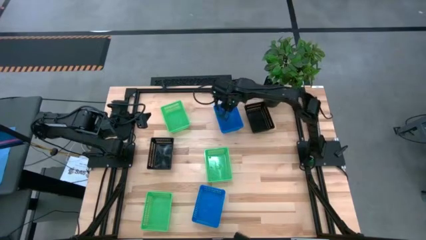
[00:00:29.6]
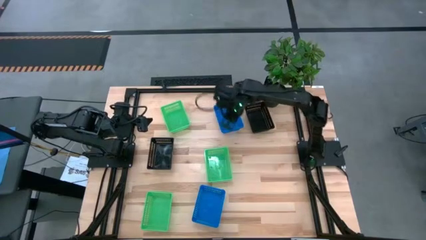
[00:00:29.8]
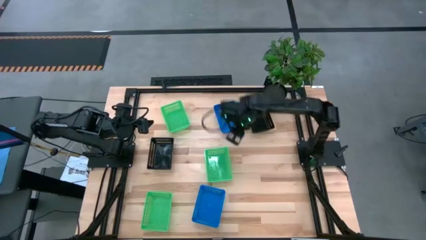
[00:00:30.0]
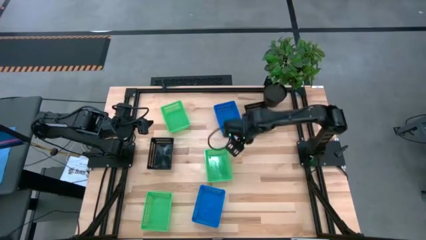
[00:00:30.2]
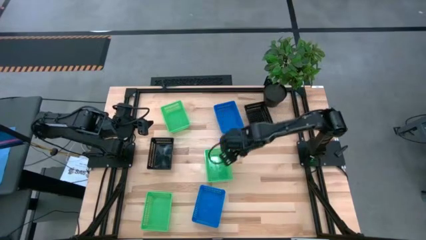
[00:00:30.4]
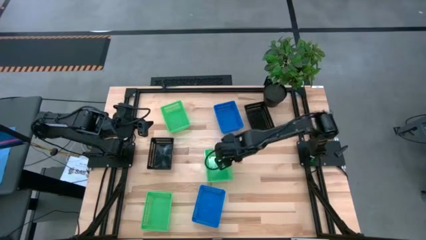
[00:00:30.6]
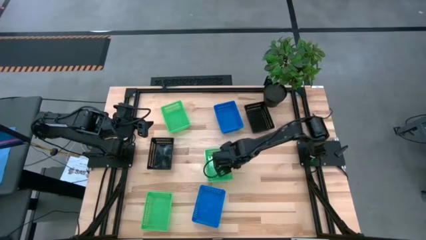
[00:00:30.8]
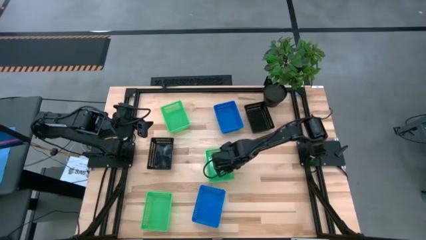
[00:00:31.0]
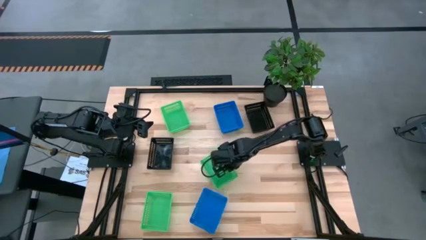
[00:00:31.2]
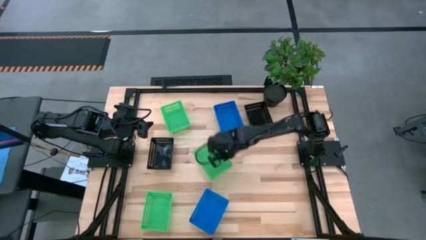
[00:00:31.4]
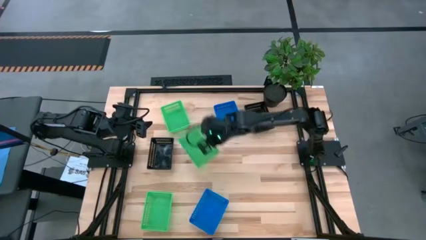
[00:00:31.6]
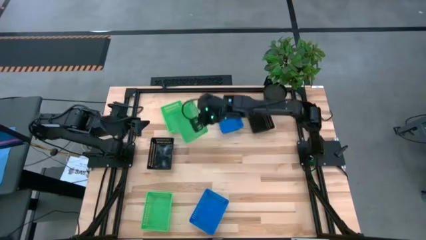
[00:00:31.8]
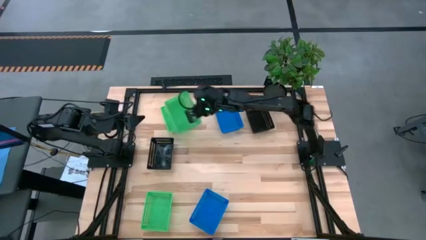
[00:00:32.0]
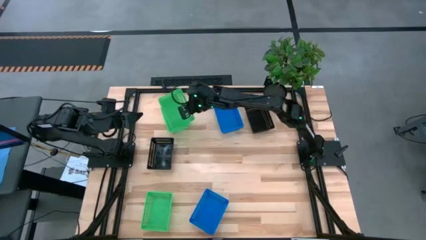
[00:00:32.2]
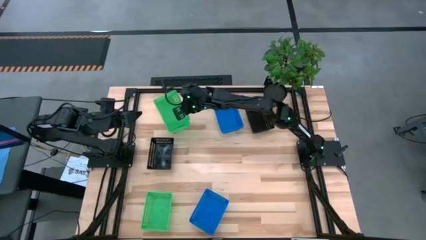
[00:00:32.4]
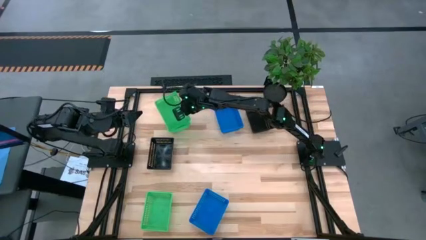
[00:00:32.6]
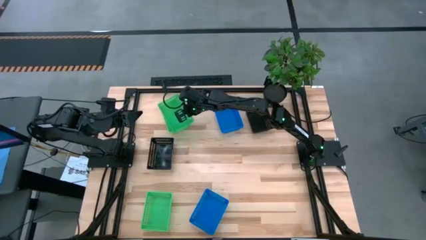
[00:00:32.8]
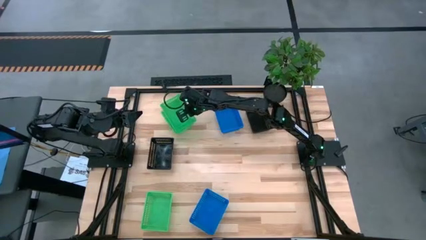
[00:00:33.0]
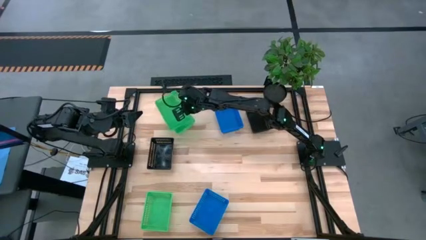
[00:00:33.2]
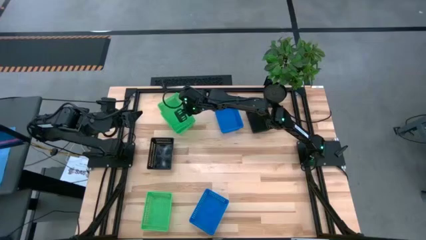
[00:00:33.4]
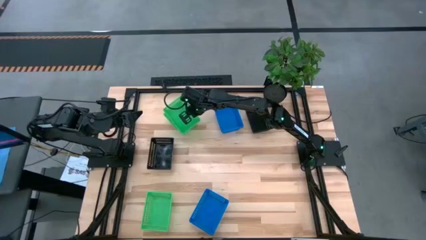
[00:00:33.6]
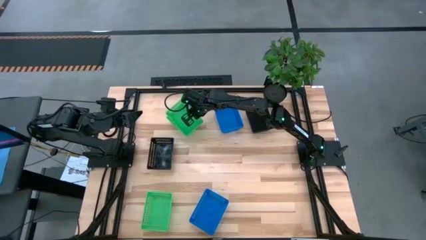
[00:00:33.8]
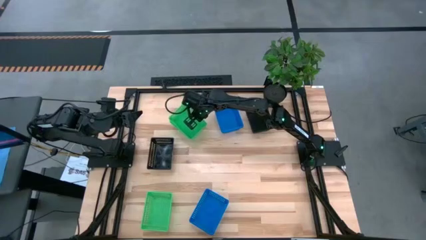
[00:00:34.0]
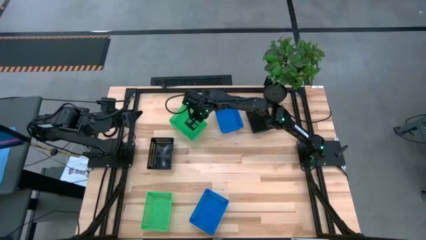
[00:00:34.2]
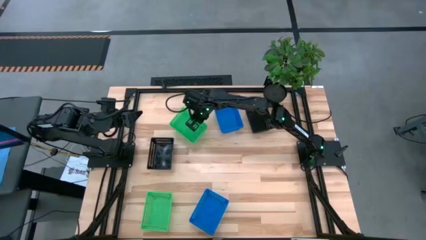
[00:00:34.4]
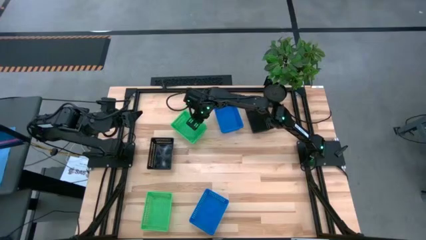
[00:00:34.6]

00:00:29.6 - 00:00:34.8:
Stack the middle green bin on top of the top green bin

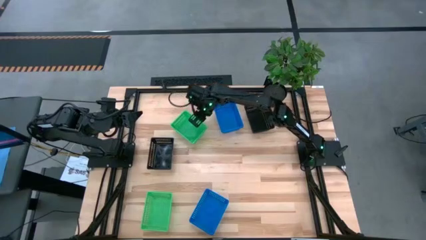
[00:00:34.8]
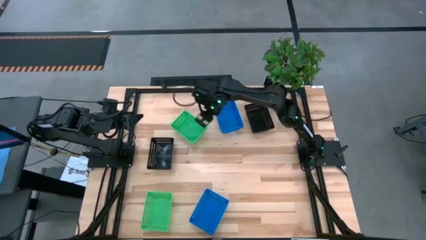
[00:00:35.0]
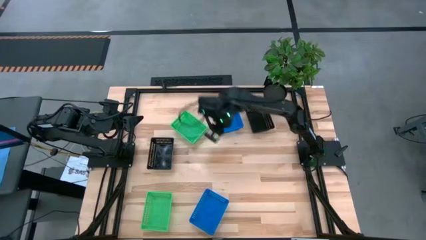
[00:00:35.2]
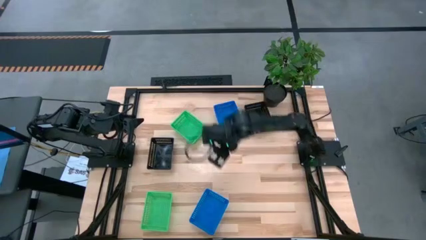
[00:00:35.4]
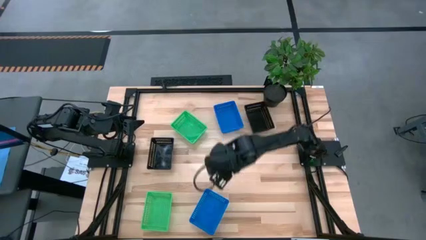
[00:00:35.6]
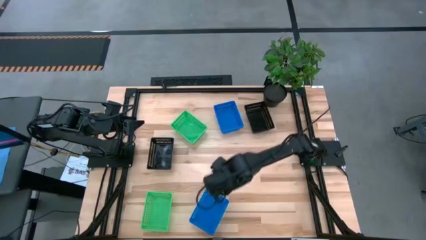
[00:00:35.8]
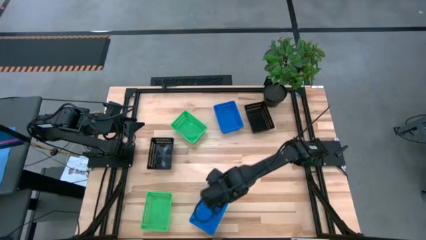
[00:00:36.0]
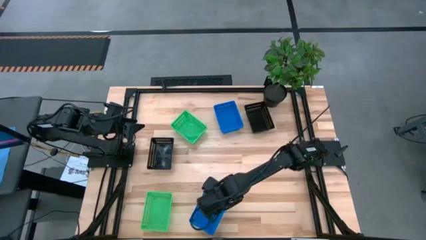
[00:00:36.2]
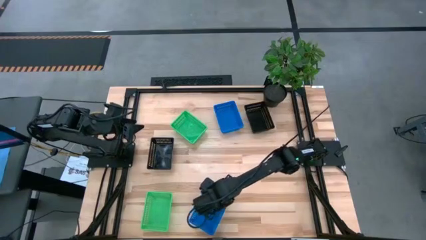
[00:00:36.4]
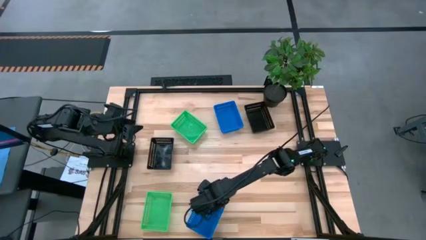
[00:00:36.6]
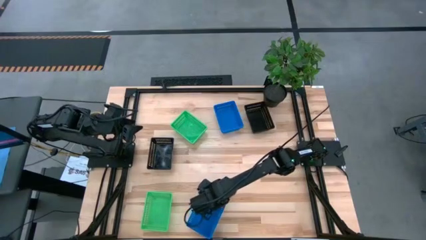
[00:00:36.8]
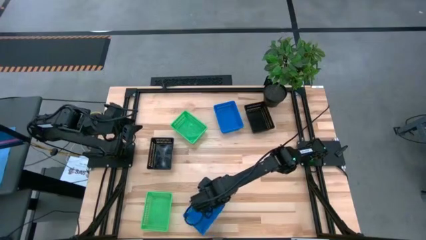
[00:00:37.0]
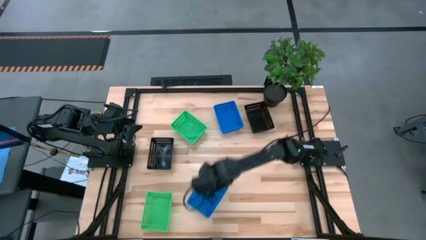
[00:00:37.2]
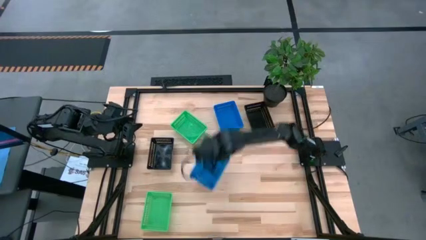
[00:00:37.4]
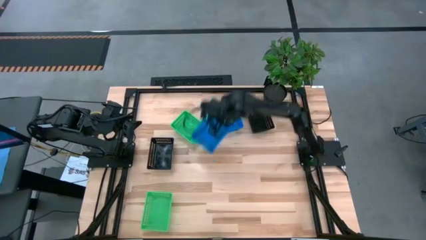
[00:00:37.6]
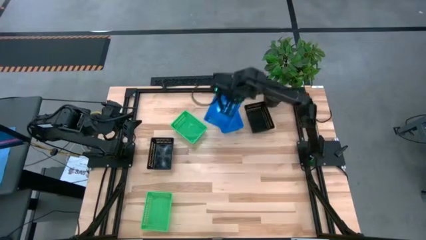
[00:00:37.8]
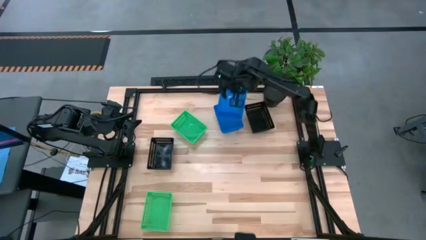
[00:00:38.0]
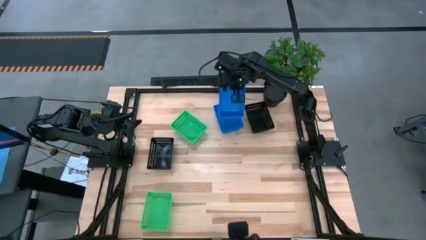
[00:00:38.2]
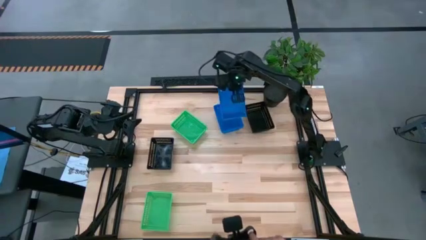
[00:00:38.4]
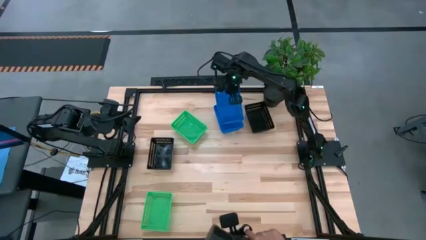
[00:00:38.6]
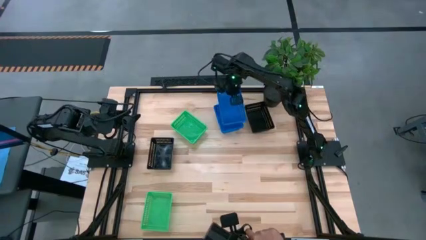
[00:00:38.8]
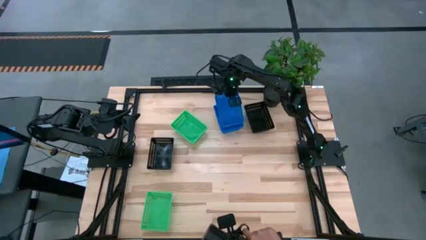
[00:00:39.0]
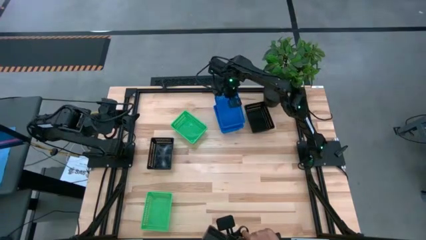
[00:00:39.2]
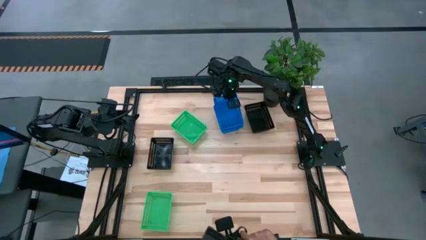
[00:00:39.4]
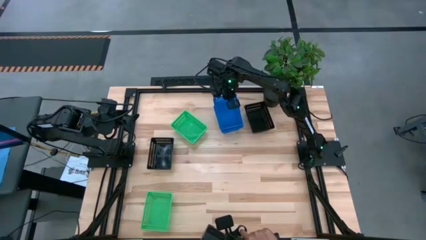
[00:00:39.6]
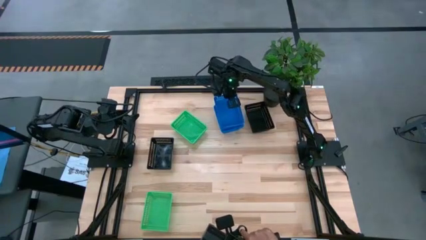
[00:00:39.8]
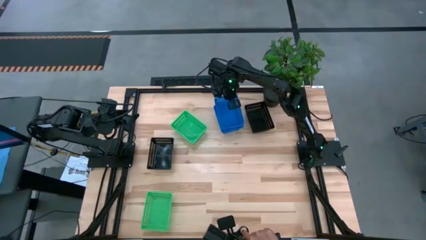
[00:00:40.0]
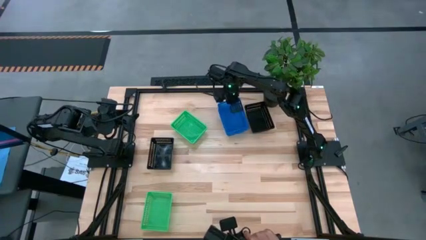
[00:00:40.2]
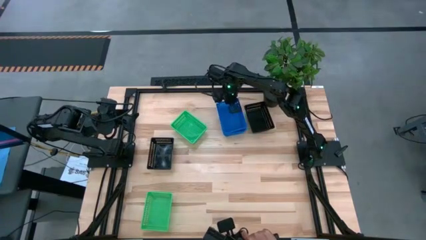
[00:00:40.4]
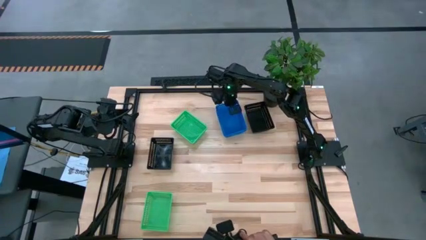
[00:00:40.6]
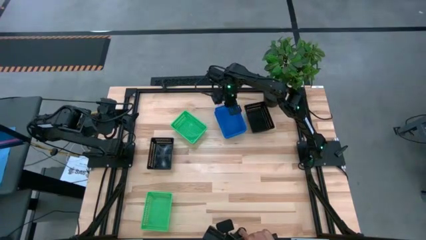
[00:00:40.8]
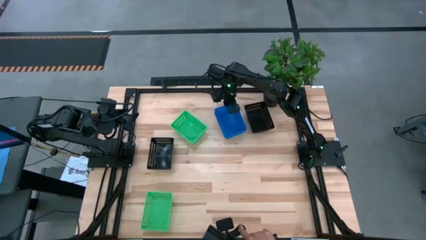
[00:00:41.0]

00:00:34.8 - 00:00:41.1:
Stack the bottom blue bin on top of the top blue bins

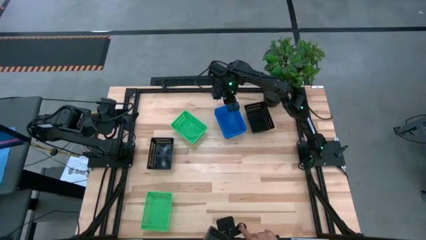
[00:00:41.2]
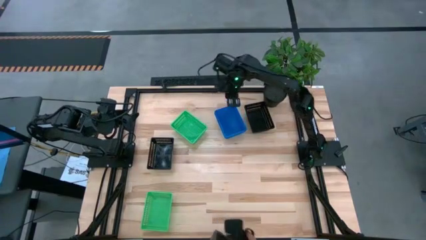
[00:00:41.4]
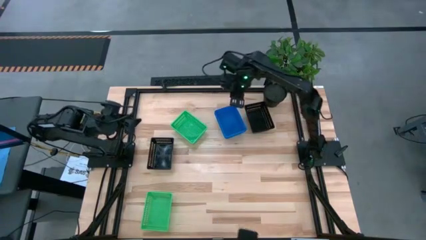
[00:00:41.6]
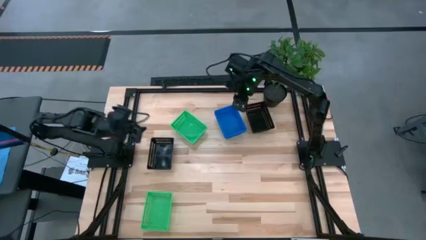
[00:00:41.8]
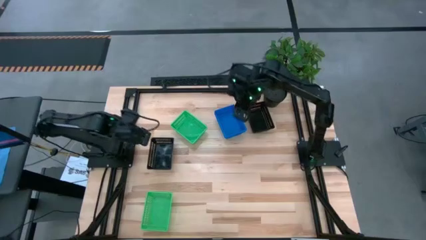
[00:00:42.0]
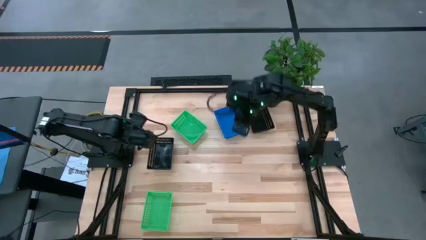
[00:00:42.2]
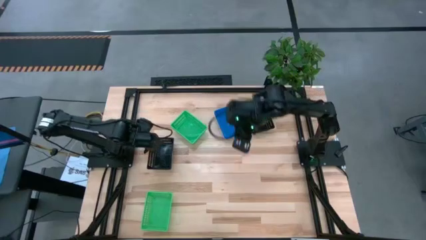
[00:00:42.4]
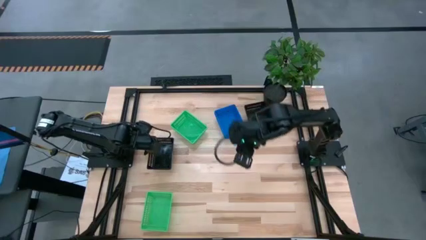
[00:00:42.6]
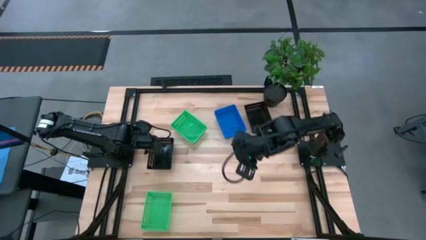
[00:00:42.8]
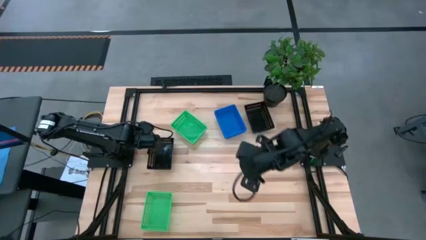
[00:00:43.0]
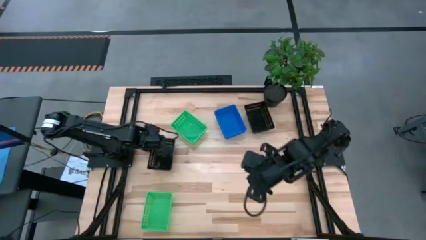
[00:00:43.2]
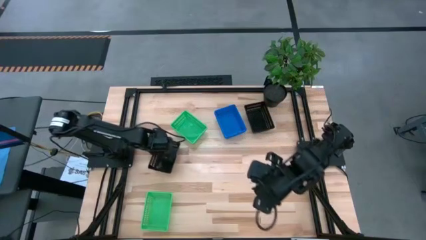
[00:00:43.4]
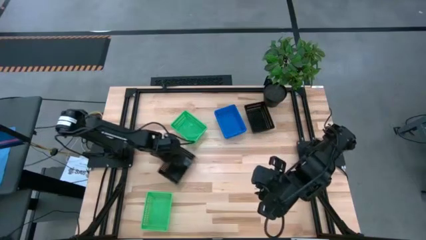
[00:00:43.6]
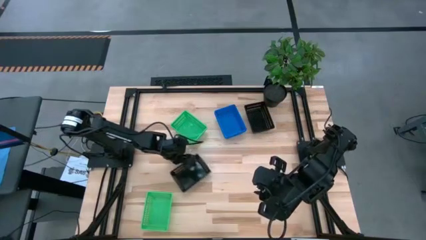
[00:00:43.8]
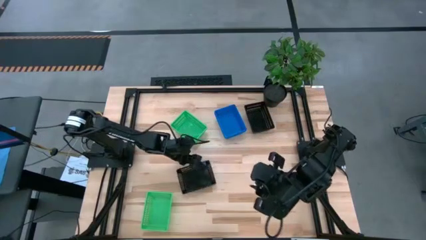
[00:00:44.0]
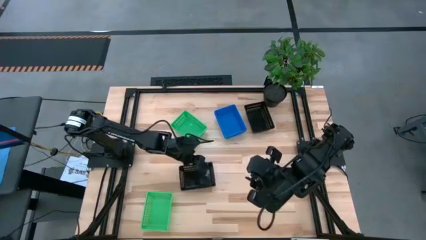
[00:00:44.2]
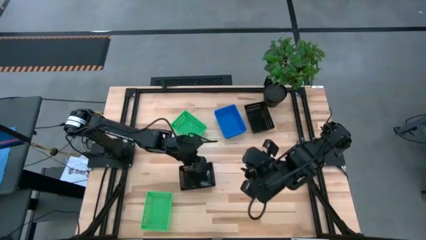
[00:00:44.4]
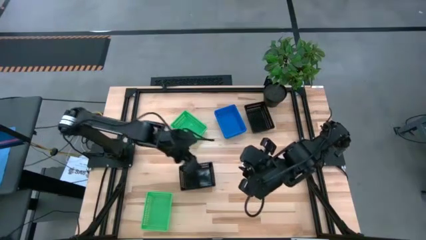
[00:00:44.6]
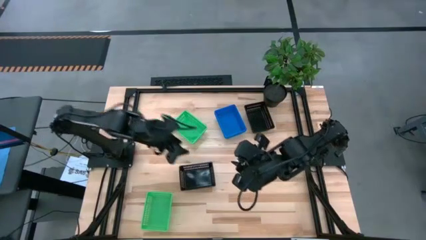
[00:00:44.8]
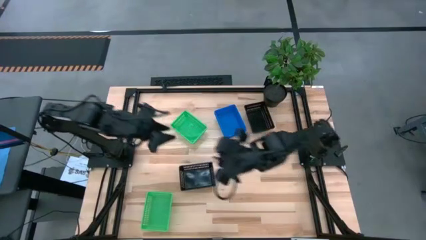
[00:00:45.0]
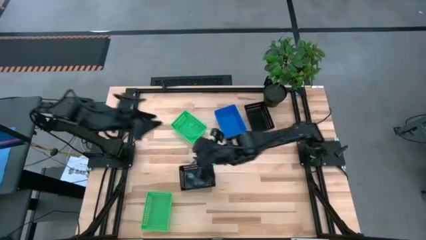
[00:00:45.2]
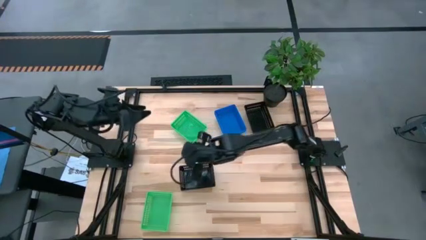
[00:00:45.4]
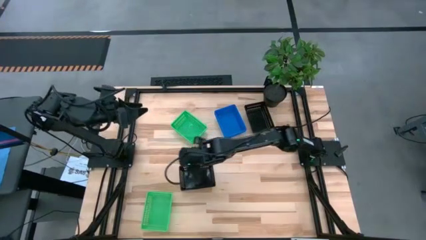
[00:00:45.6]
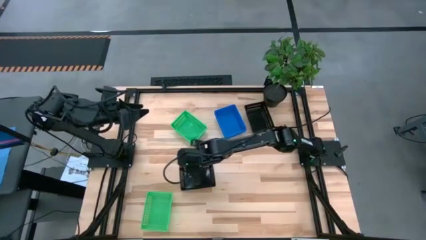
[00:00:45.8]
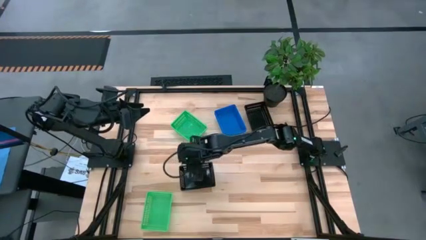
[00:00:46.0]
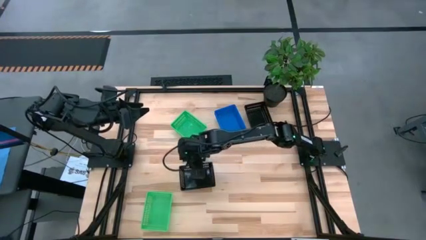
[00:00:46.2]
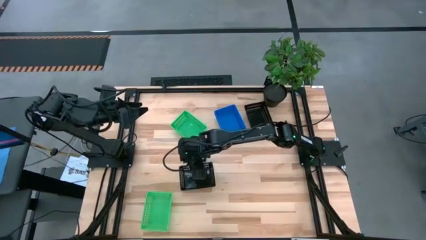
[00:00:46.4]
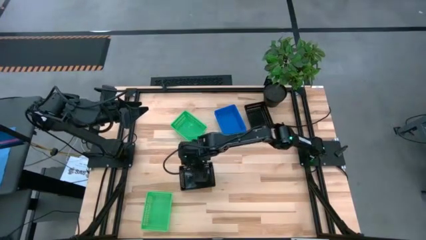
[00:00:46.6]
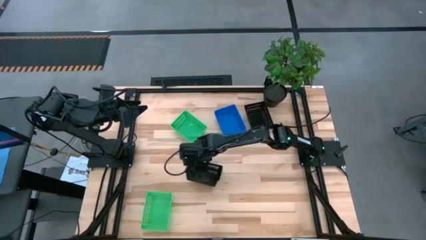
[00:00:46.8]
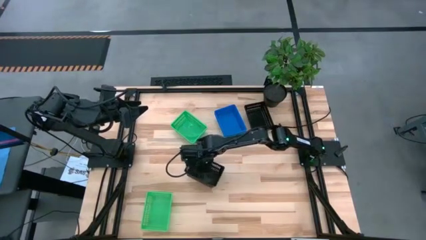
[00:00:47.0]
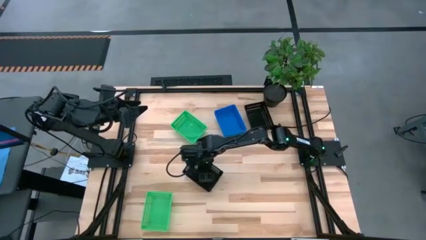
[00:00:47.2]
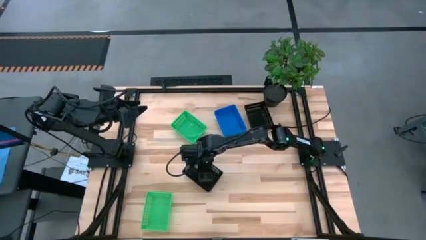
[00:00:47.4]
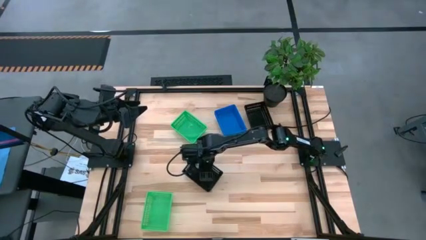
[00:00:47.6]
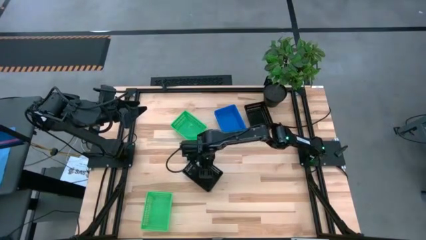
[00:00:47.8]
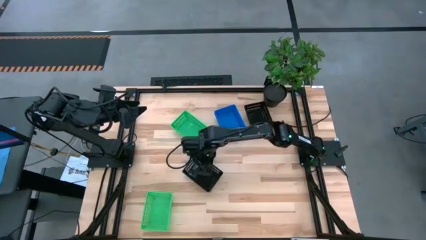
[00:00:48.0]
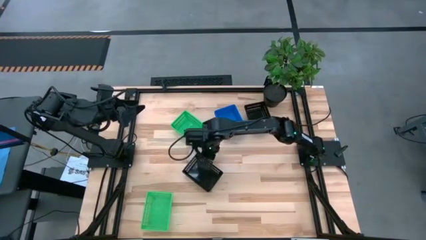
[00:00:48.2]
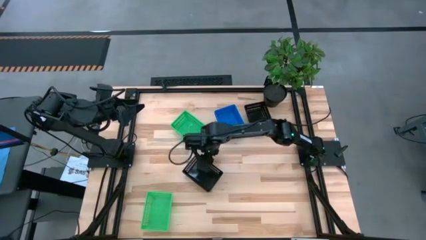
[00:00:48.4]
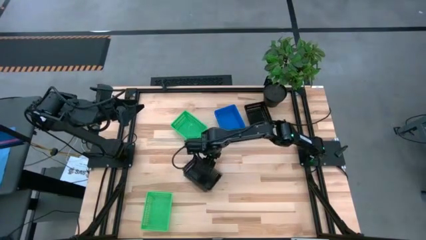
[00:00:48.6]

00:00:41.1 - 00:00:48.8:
Stack the bottom black bin on top of the top black bins
